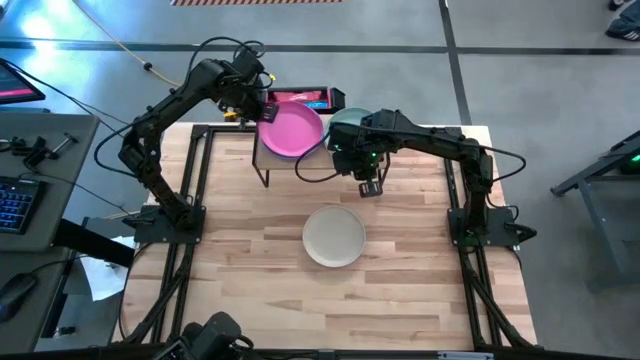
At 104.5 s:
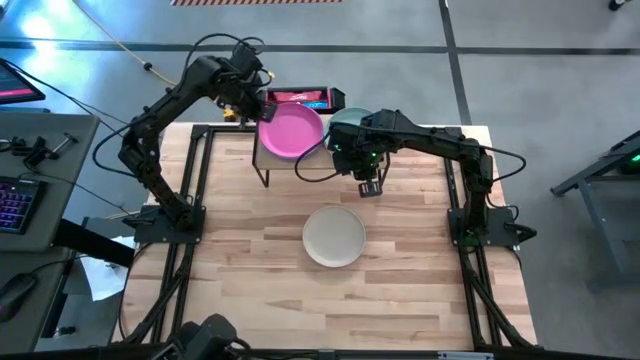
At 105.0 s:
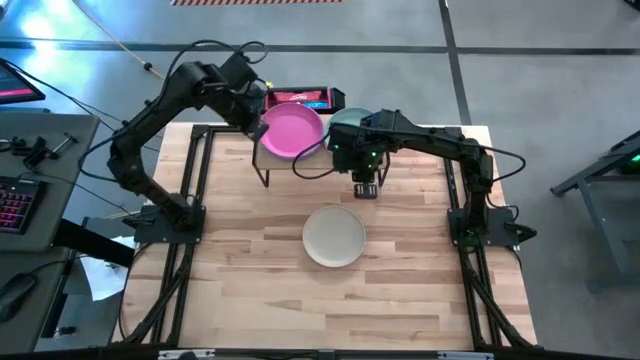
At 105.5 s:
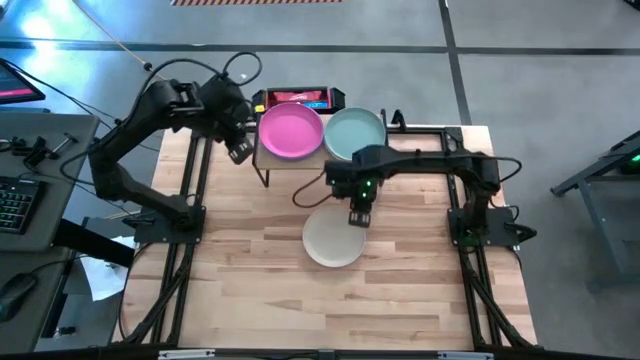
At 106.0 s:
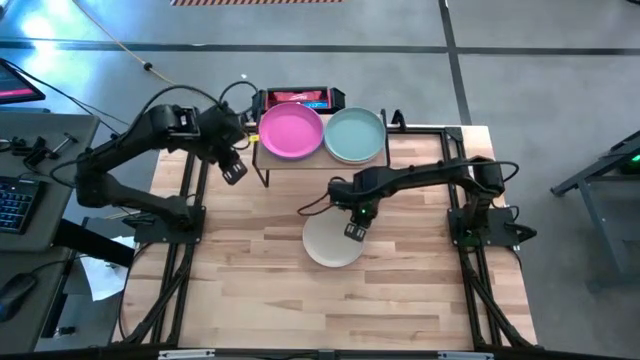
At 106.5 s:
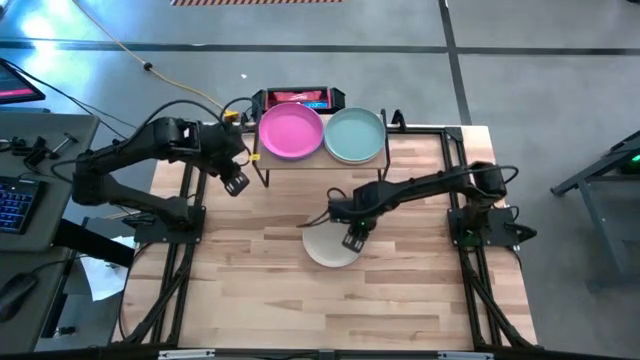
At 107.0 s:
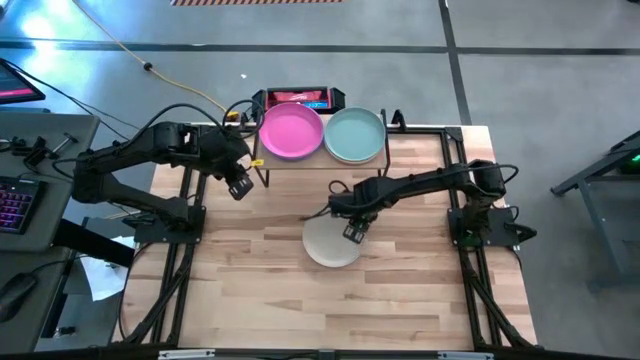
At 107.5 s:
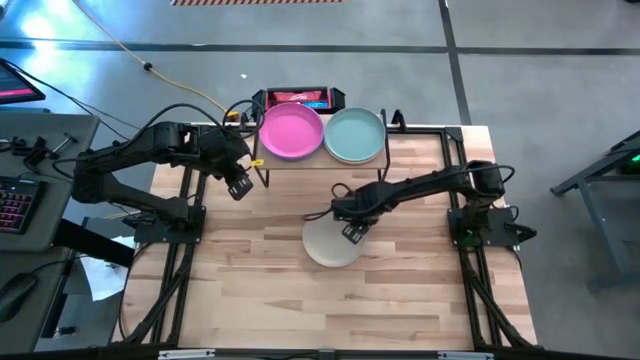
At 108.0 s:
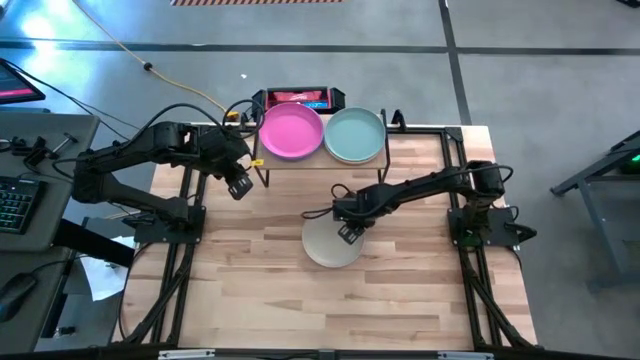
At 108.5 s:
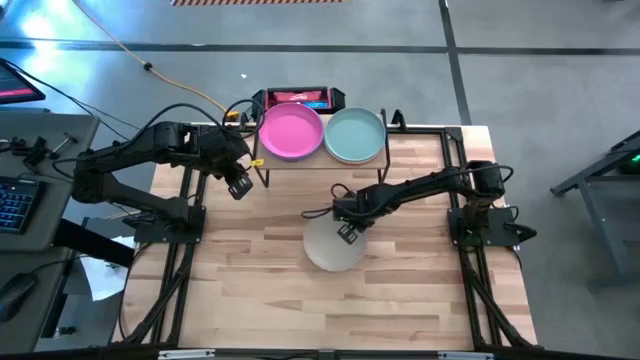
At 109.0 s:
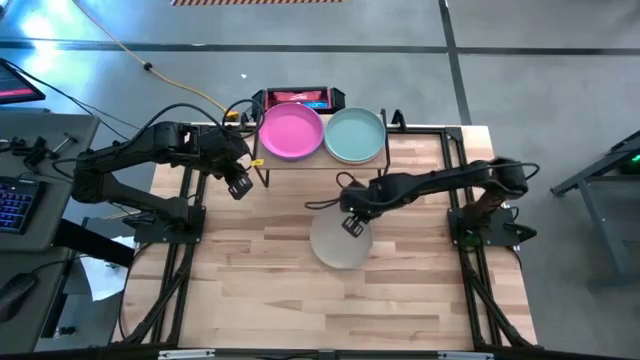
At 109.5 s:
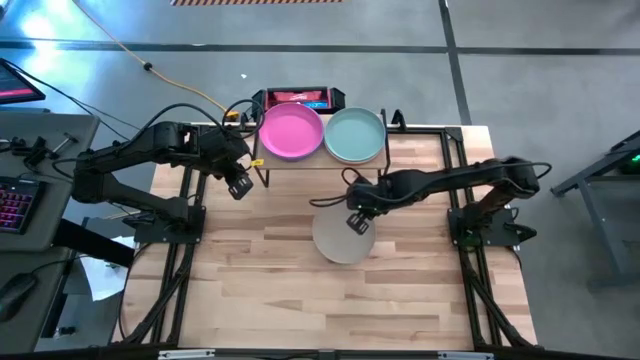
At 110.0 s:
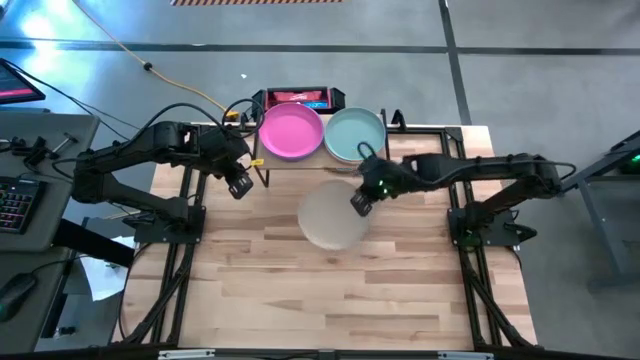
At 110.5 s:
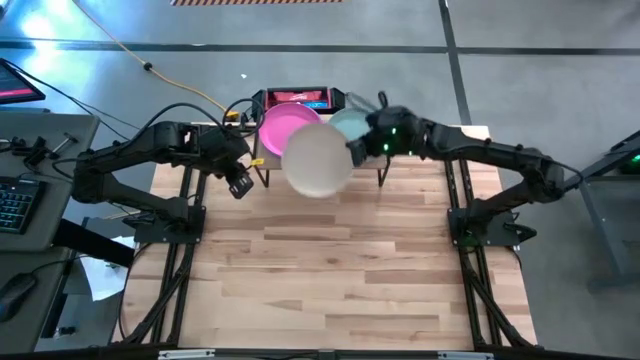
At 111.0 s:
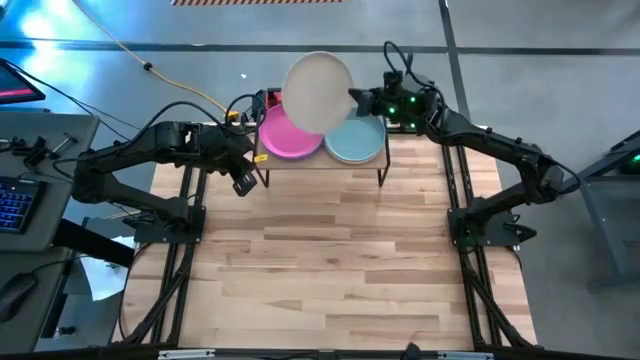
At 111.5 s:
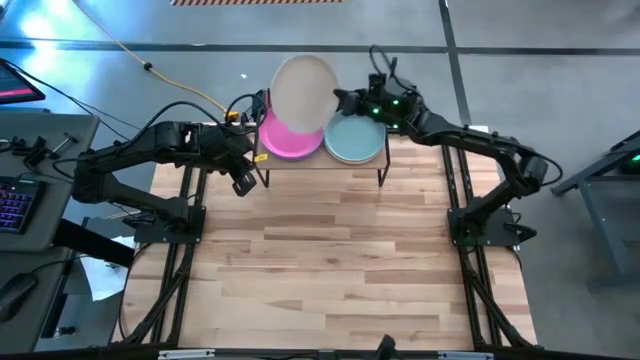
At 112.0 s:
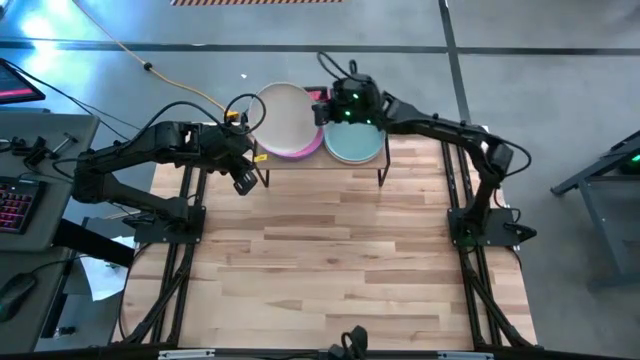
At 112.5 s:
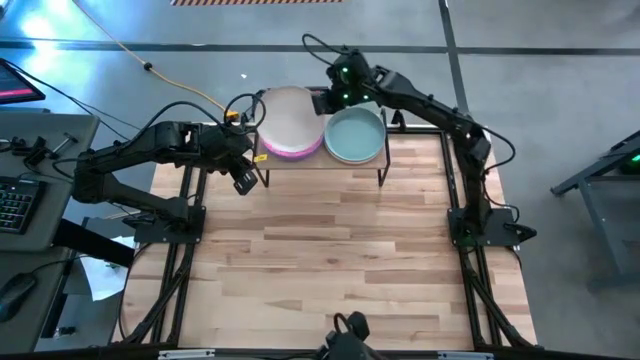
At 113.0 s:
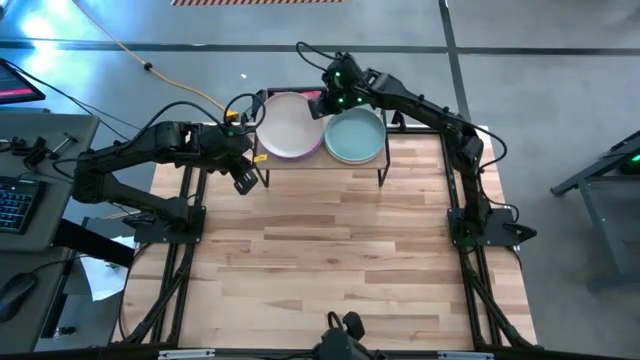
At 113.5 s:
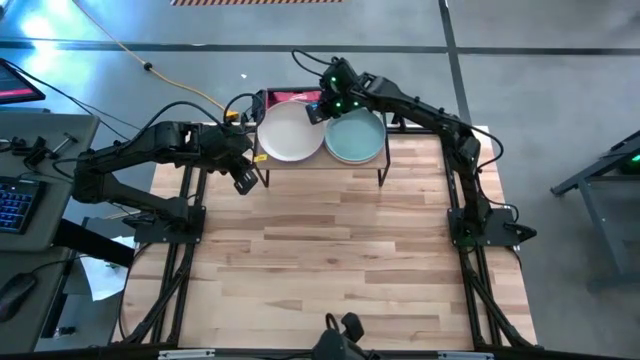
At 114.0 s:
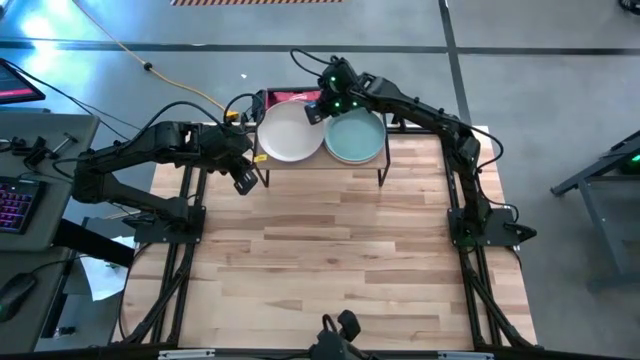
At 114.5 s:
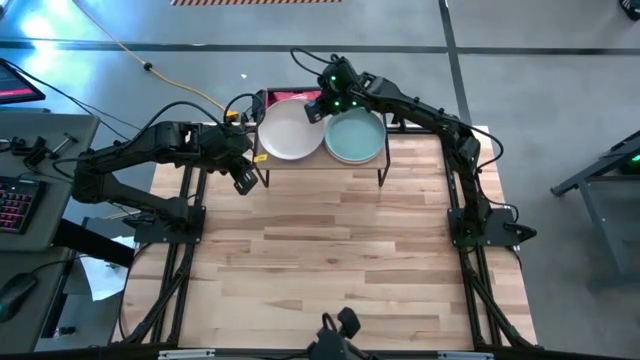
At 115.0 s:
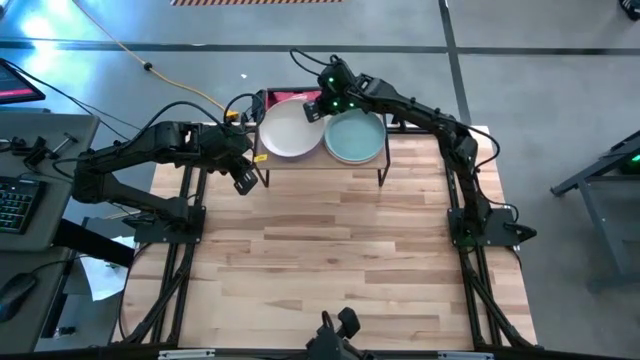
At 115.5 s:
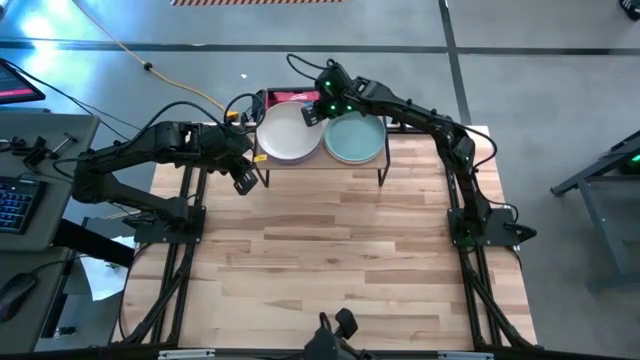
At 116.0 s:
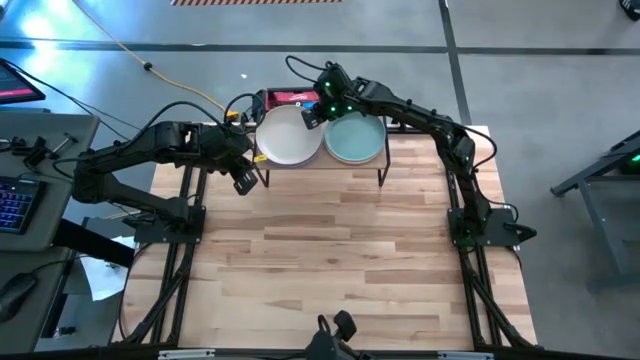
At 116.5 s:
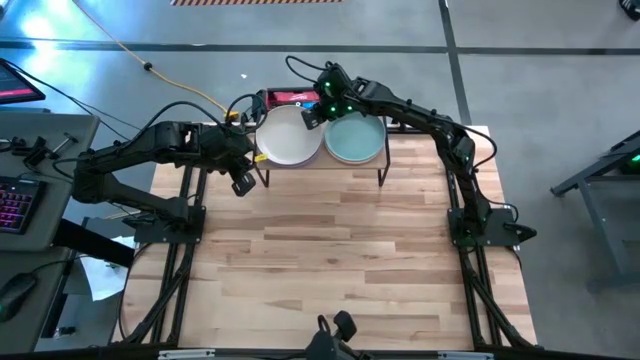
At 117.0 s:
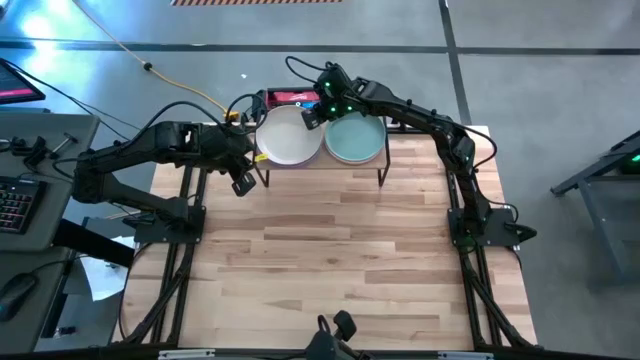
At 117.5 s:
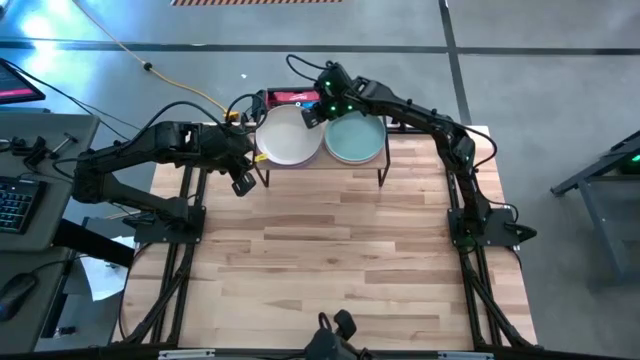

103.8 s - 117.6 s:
Task: Place and stack plates onto a shelf
Stack the light grey plate on top of the pink stacked plates on the shelf

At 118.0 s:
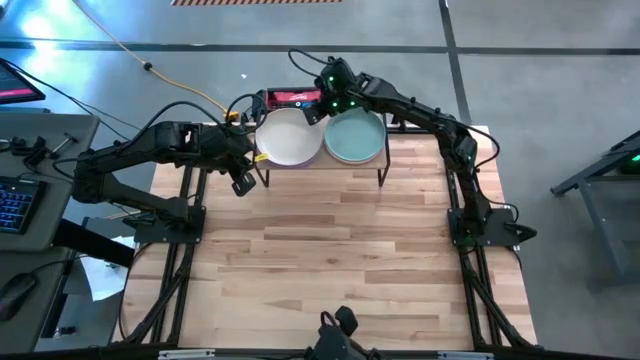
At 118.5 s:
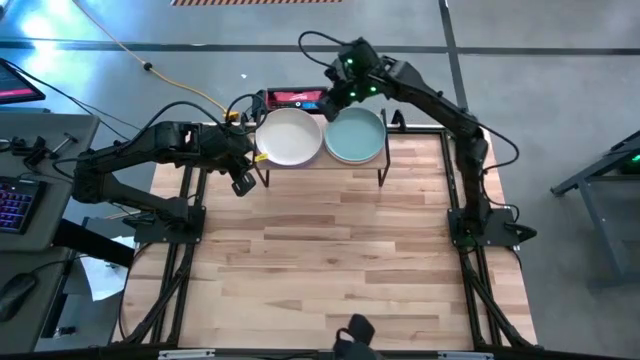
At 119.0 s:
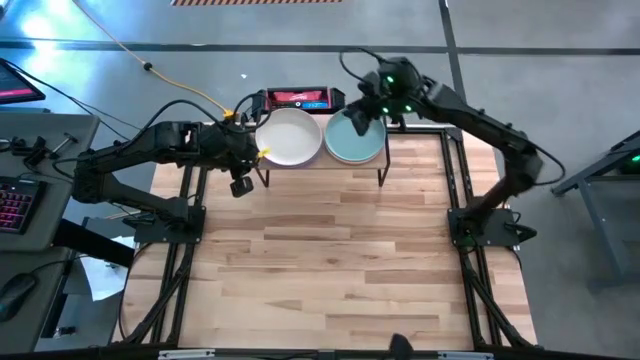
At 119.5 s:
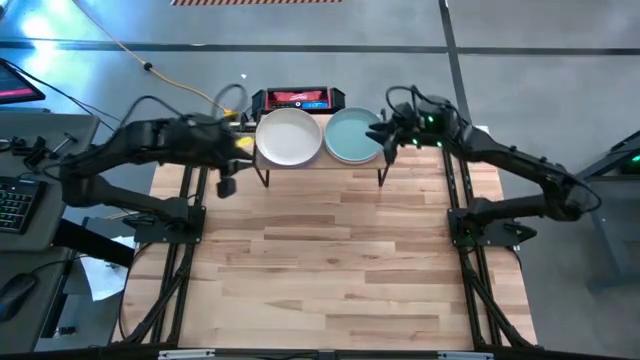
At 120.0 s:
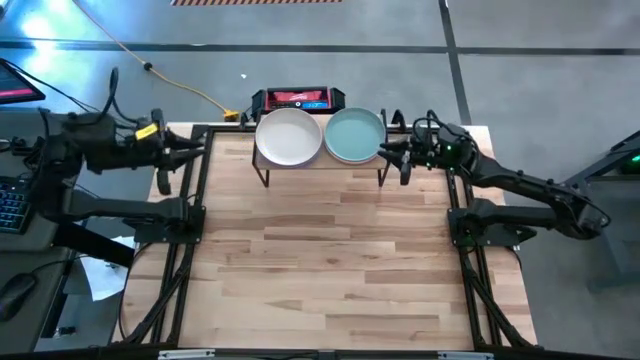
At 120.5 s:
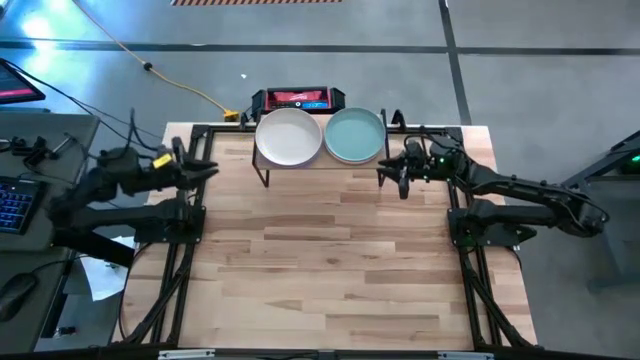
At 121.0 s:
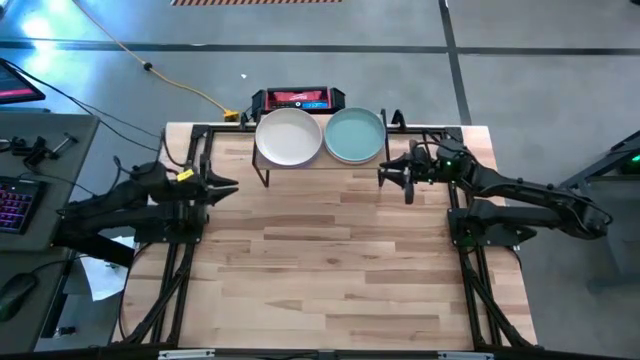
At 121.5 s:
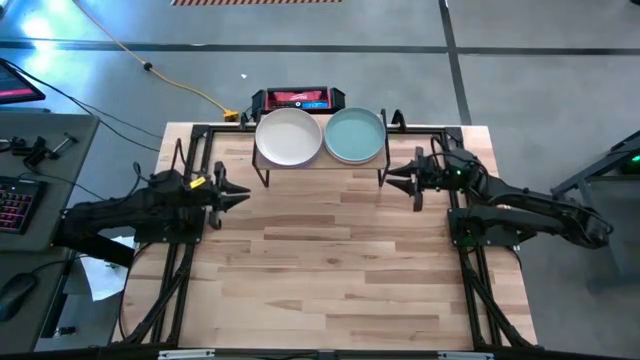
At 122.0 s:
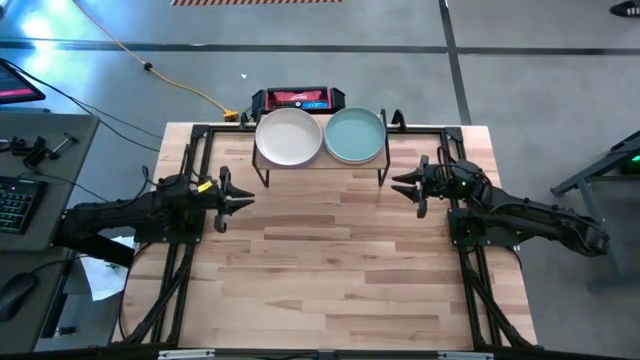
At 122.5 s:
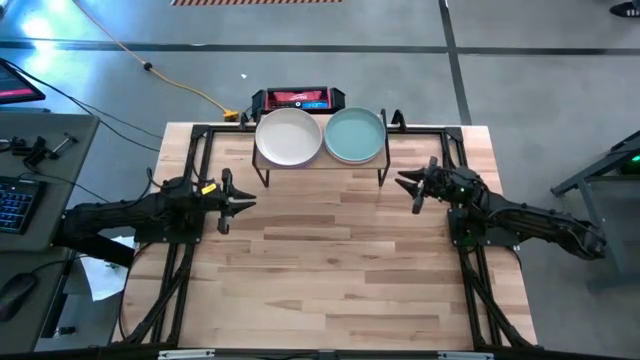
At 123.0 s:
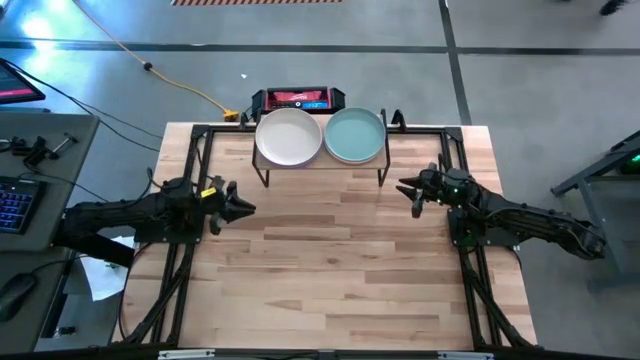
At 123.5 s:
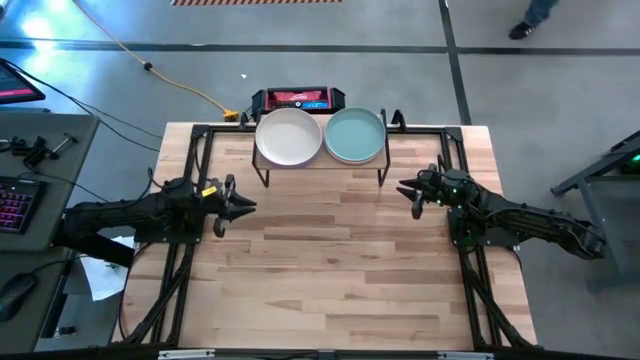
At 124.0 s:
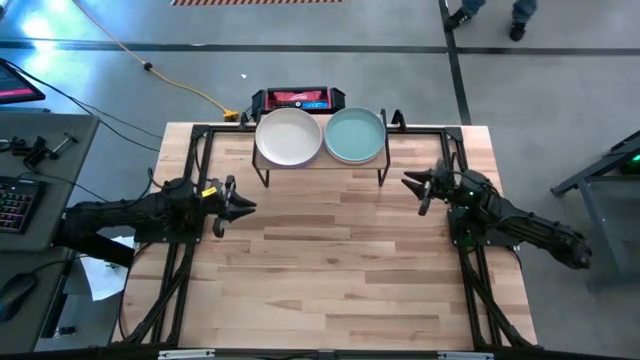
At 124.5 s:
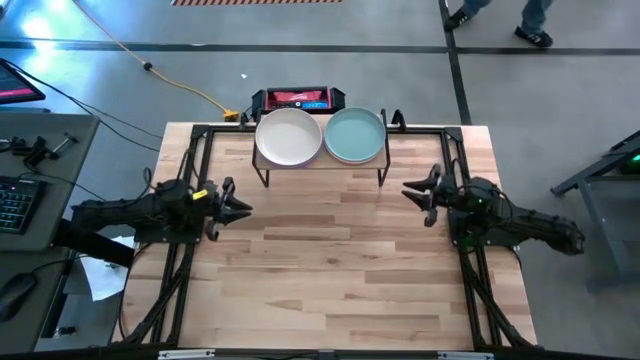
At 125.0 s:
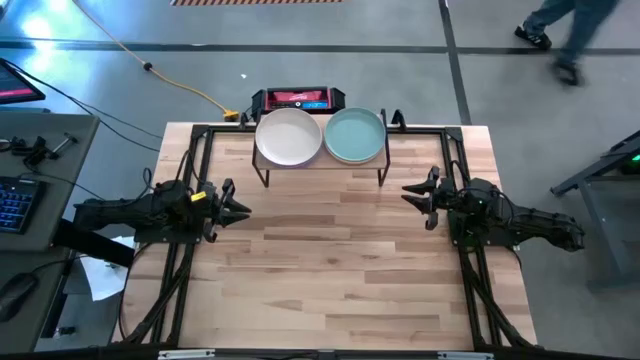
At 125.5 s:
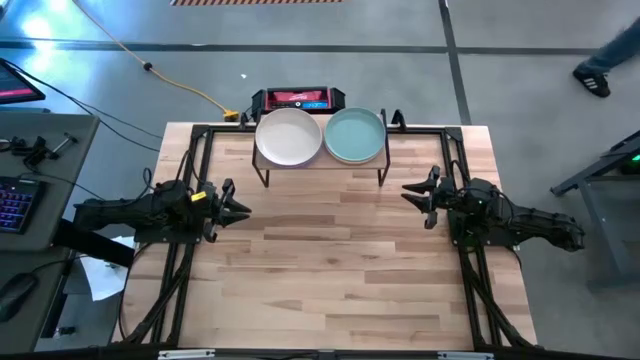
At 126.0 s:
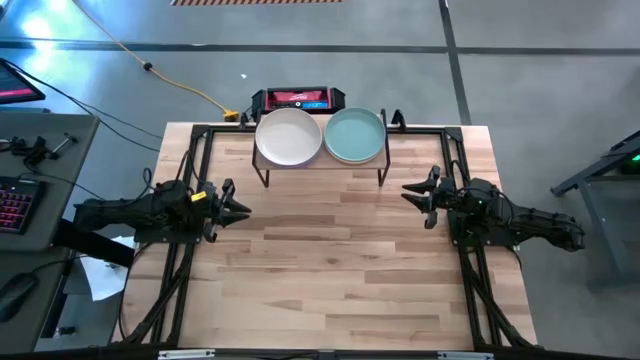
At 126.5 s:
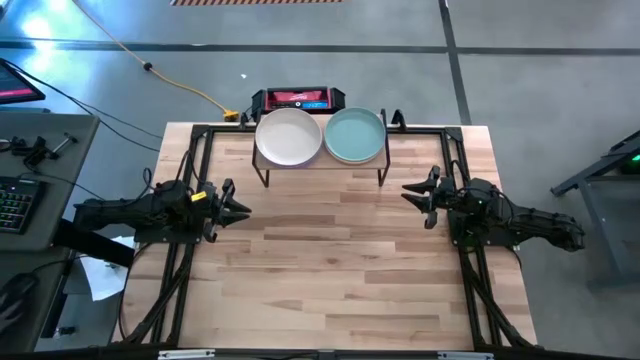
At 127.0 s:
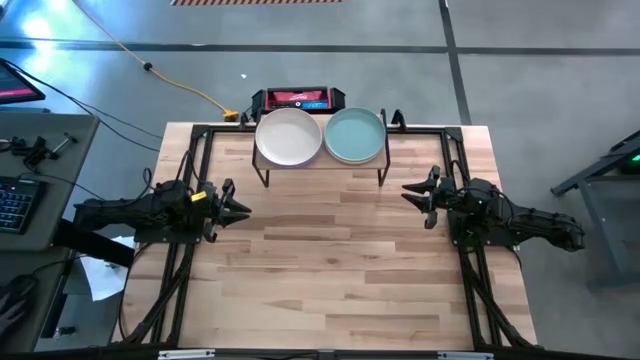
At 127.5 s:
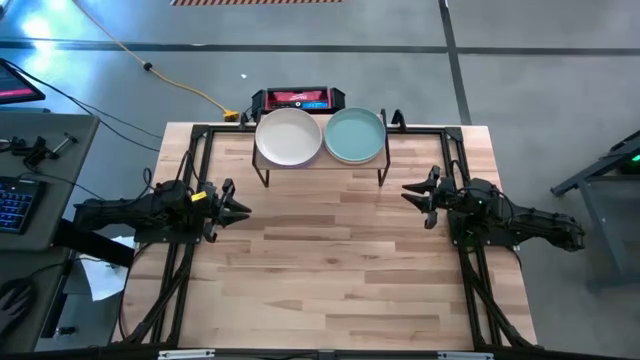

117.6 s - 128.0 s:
Return to Home Position
